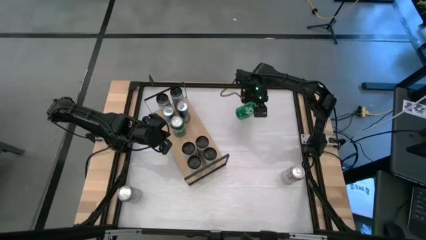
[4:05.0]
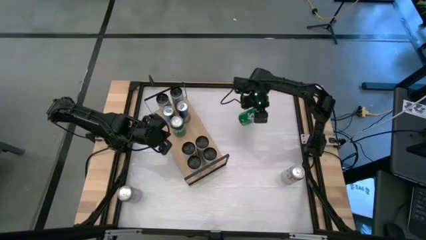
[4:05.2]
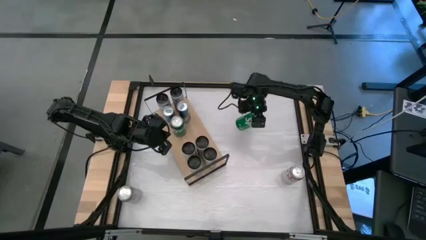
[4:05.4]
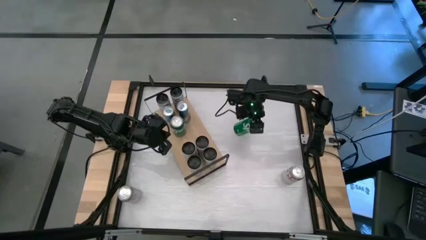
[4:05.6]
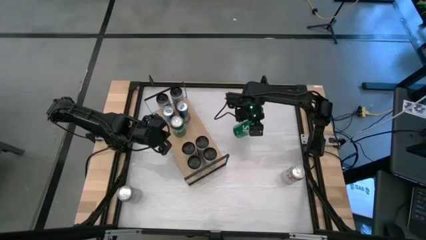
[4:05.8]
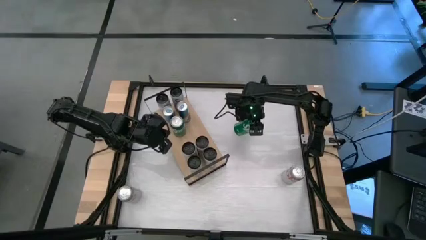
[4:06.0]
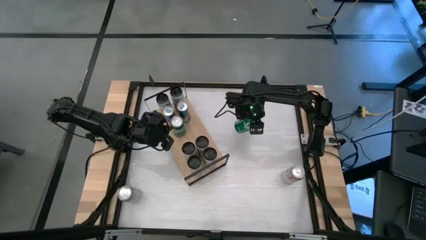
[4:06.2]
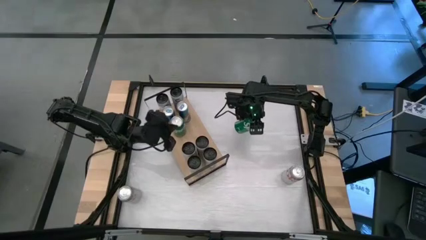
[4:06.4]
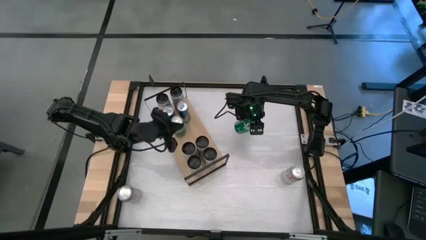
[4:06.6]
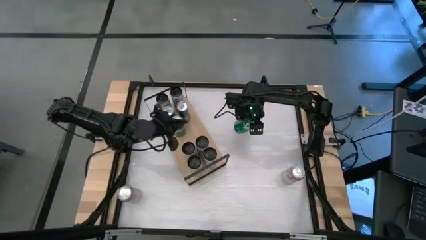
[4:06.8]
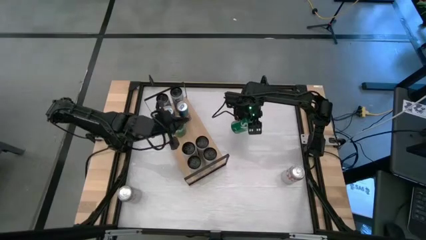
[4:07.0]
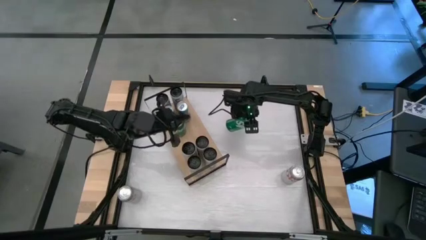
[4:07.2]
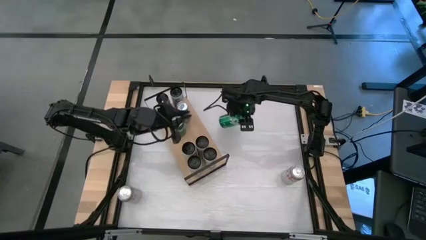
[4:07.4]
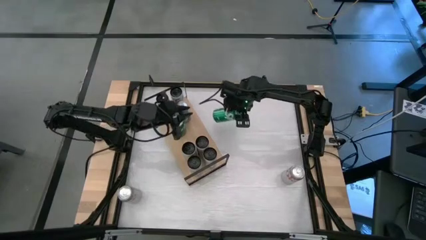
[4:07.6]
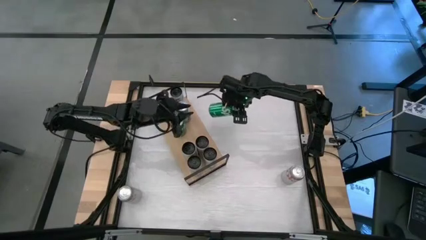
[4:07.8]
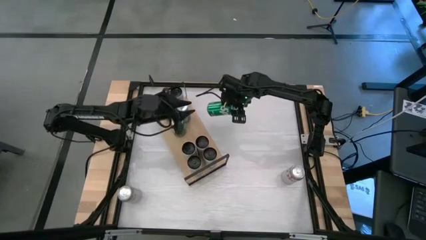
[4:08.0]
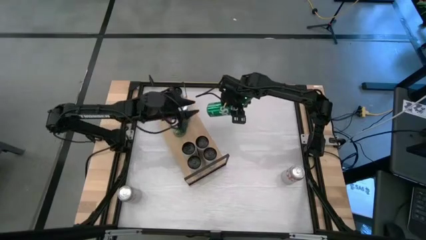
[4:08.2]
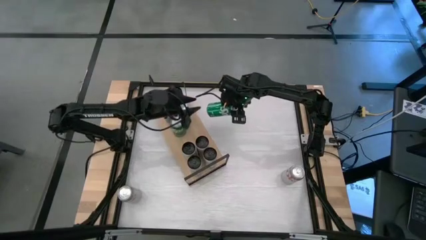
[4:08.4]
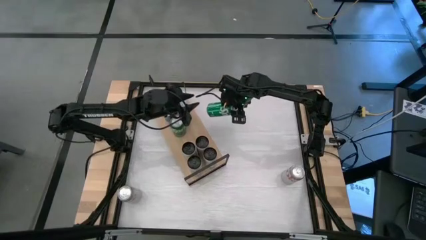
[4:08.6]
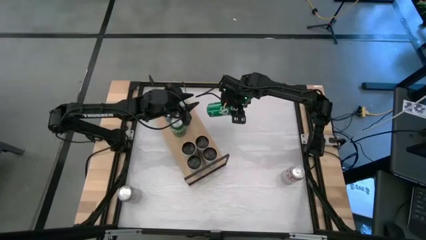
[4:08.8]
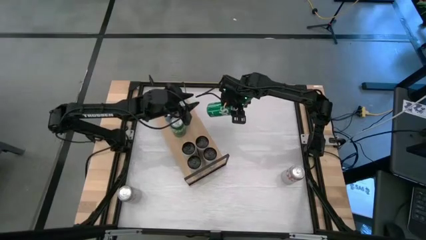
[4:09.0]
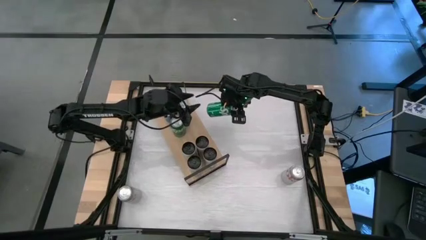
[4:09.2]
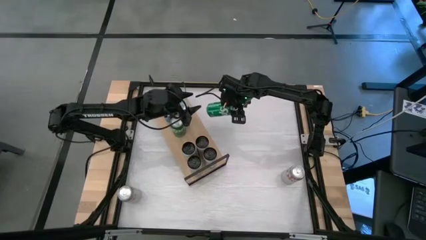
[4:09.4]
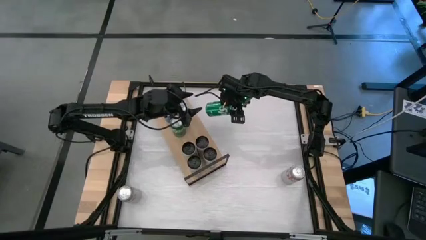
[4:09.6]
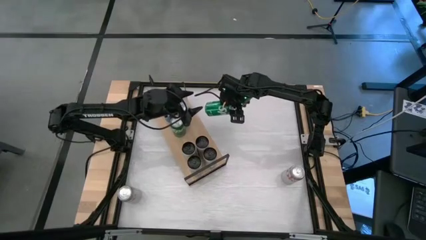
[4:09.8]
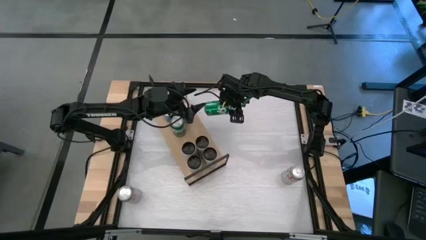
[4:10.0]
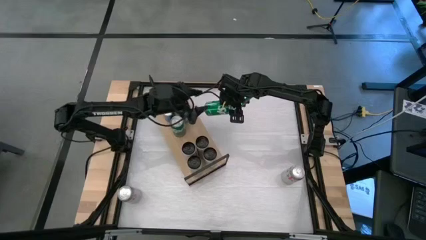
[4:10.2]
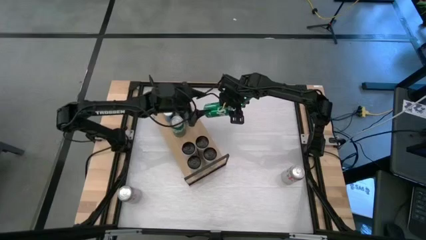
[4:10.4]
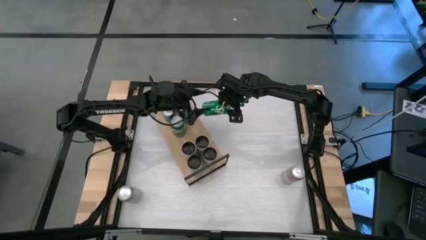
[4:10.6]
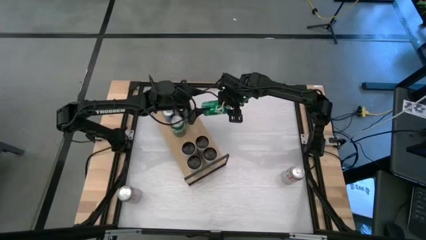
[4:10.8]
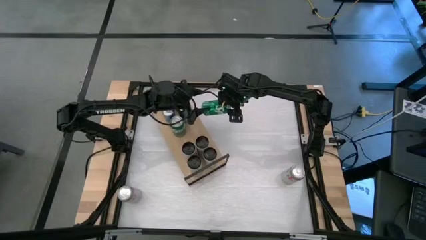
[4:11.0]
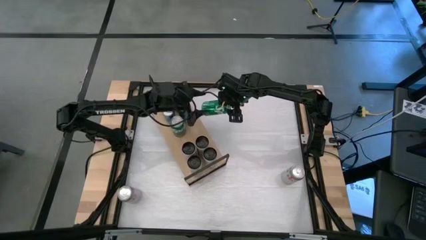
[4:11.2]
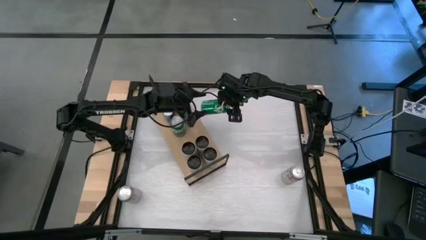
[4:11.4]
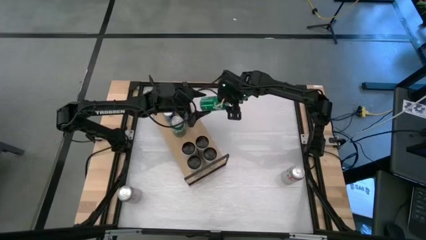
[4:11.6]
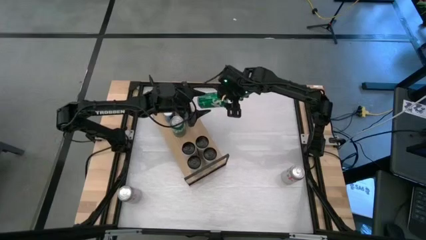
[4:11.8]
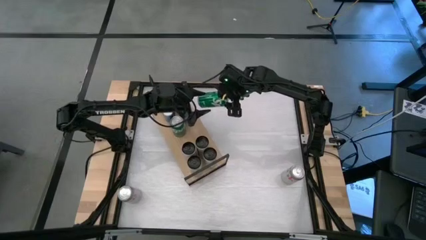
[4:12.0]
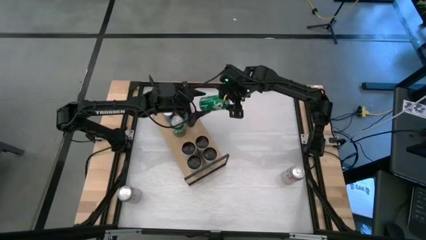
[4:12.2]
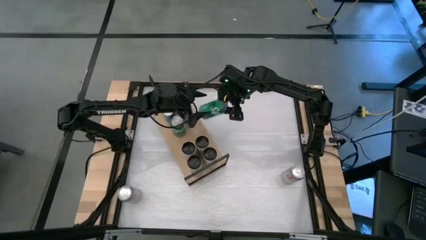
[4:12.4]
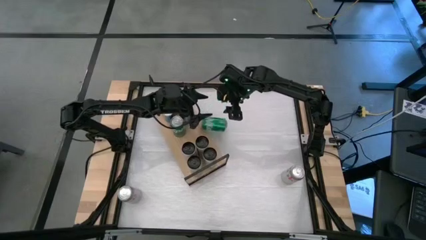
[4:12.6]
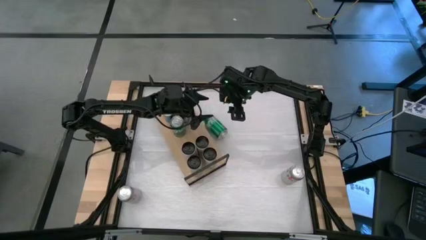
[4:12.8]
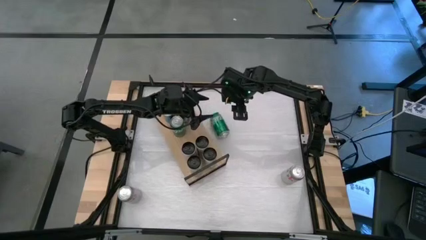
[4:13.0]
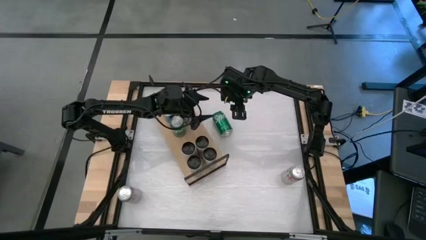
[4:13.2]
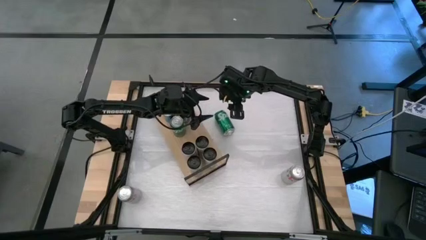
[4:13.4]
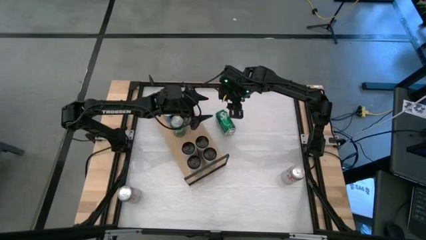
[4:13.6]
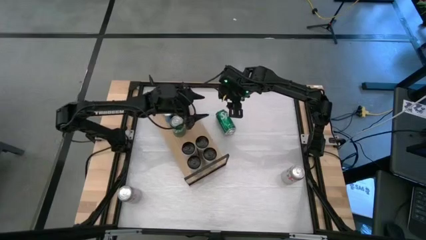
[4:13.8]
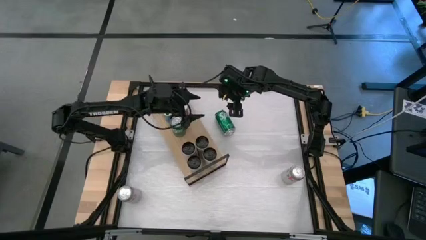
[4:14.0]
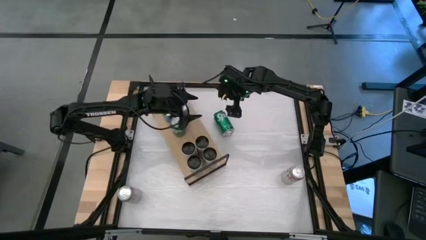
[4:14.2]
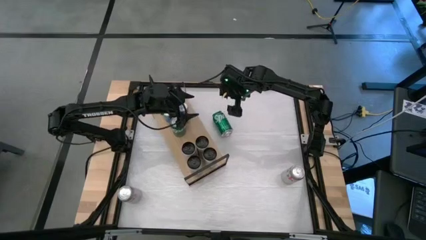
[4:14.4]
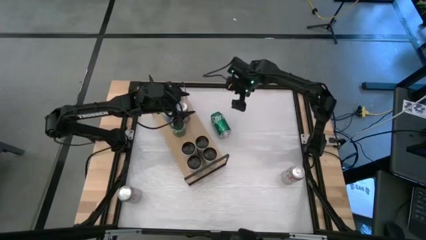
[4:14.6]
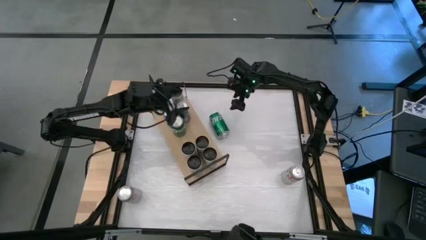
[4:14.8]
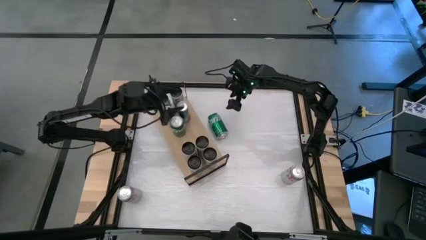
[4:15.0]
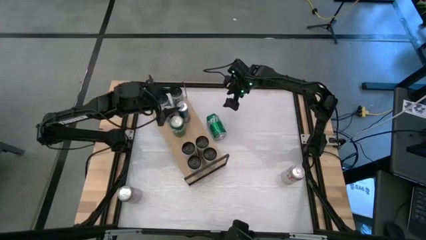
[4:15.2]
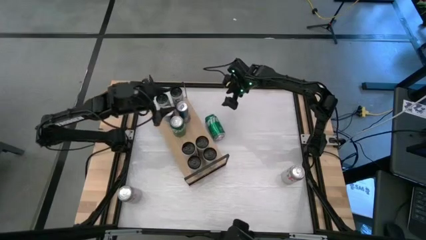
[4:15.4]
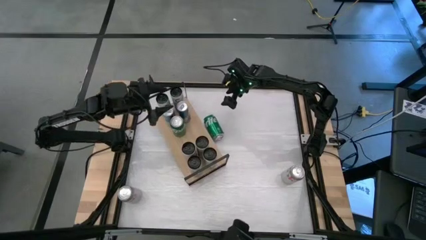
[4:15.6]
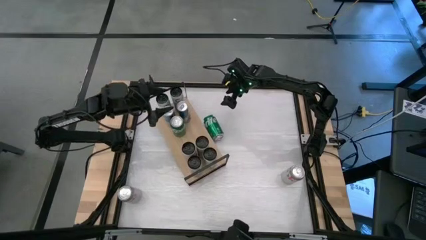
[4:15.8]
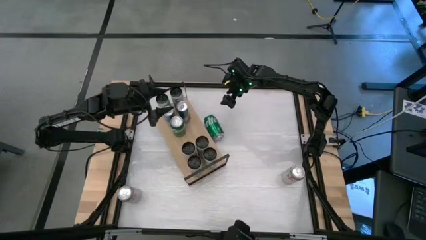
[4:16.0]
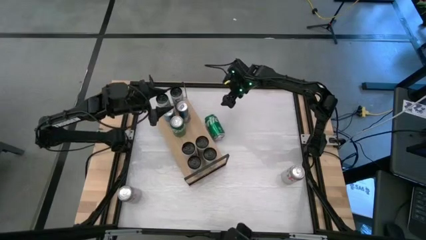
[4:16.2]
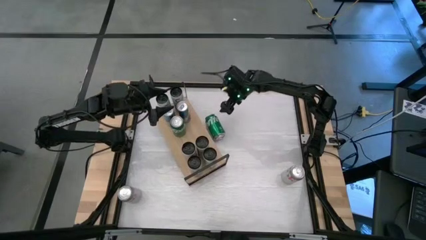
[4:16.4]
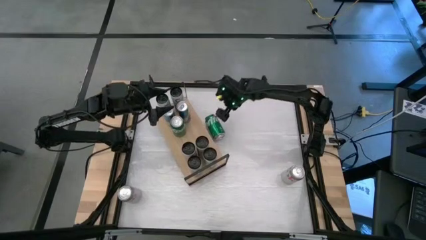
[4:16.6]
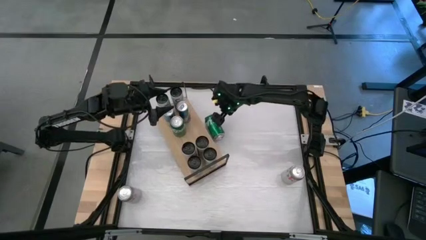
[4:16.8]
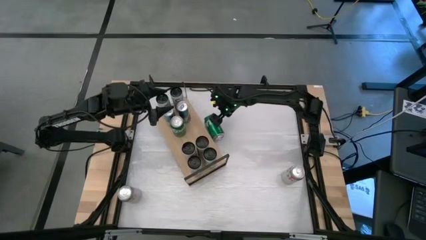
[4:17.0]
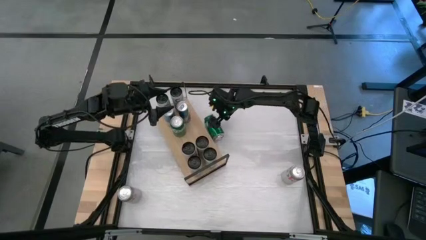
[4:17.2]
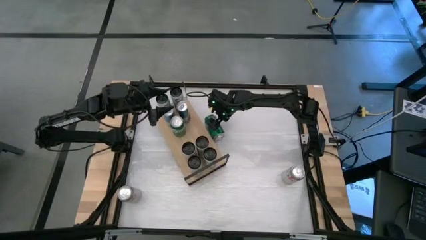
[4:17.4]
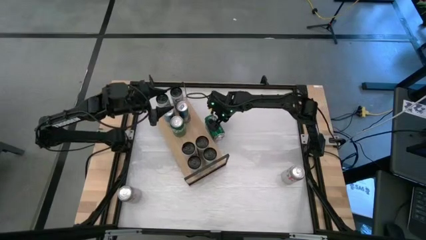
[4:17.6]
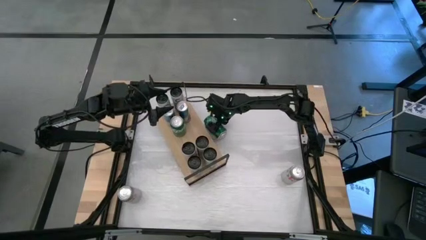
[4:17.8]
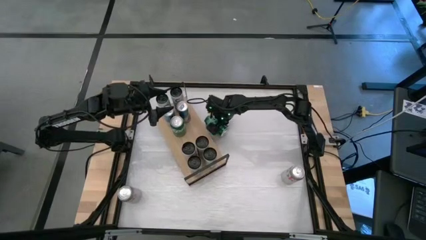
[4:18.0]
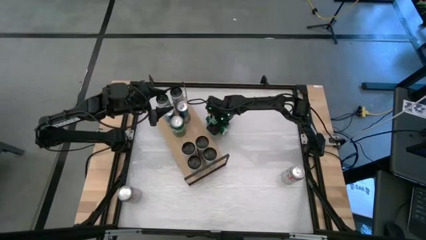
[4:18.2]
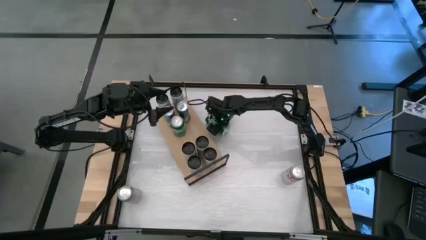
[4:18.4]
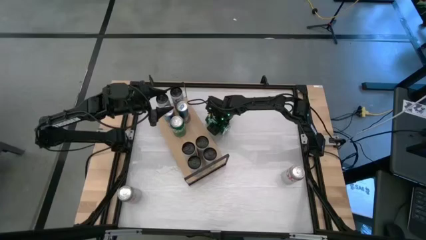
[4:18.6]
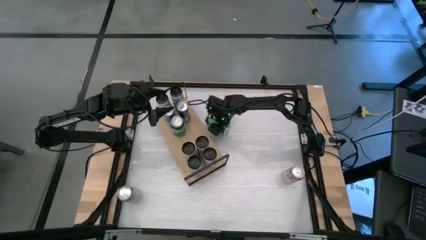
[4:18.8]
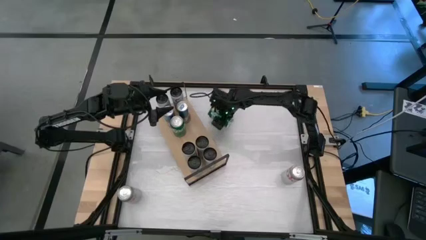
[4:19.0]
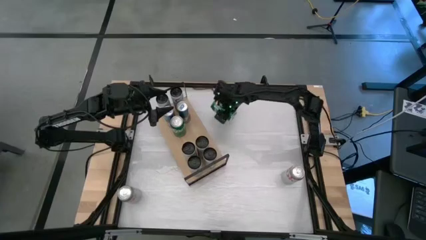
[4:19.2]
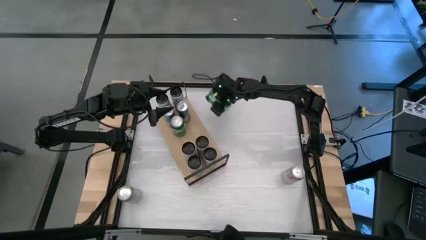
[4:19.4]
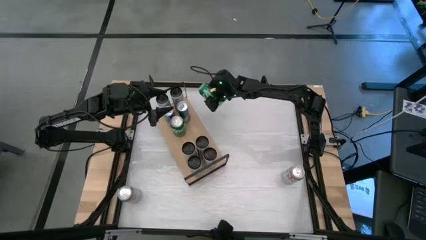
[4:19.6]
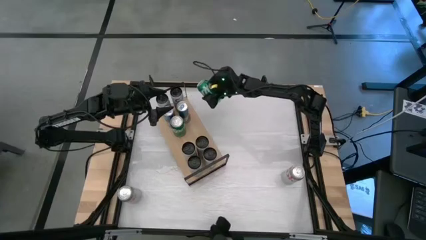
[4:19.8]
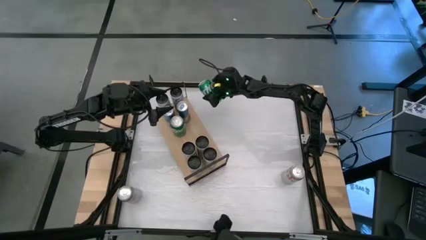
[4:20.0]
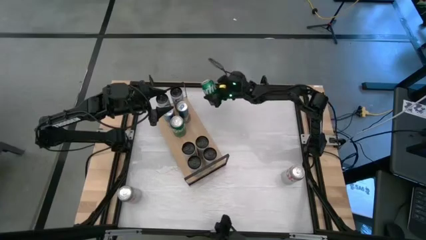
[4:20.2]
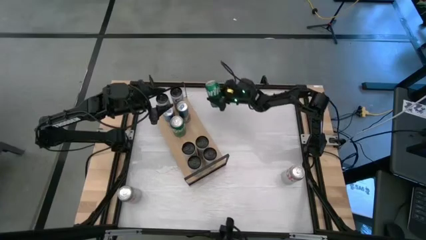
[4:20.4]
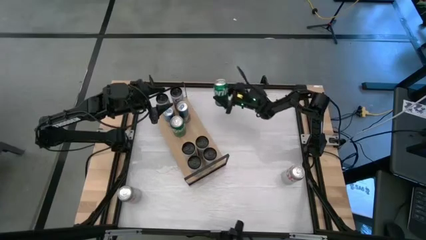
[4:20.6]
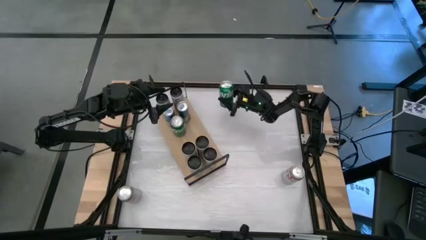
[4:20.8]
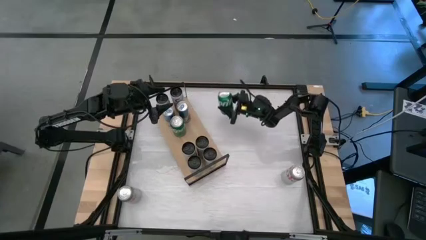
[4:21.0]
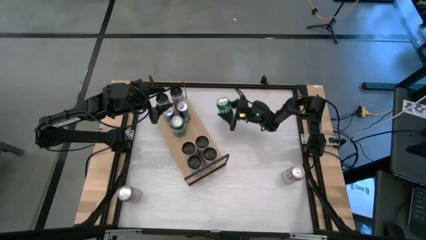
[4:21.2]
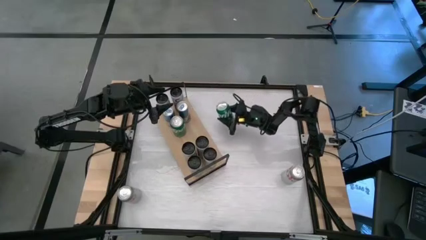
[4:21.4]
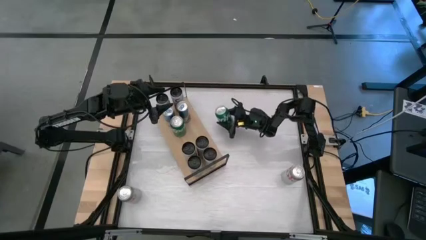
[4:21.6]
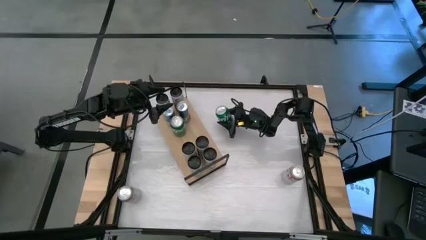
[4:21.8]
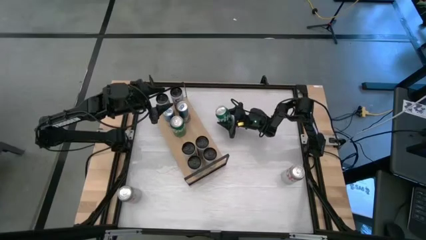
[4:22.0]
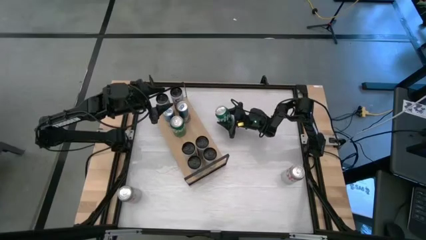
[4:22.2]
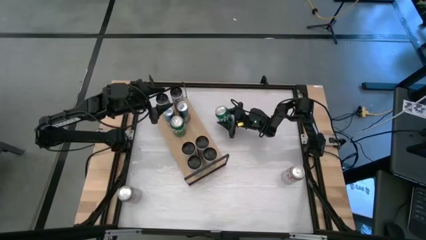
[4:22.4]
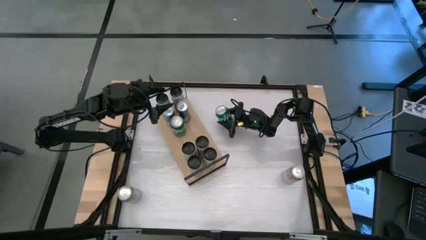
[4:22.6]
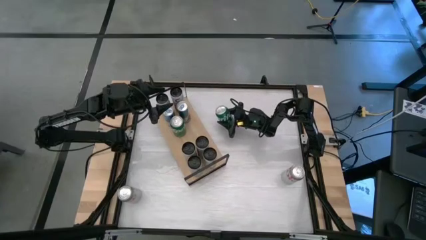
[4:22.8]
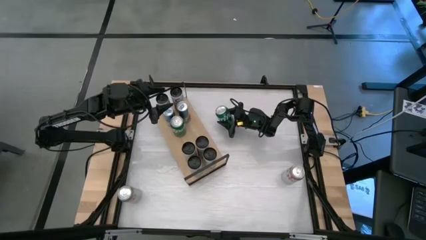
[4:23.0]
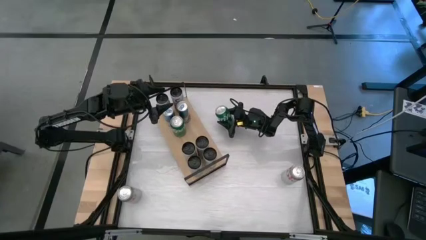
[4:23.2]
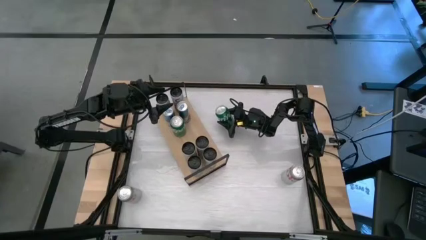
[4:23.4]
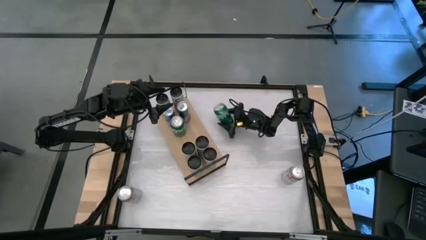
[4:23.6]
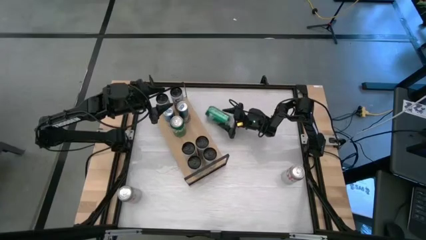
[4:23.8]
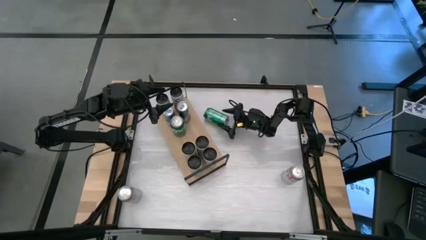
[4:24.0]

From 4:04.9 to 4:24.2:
Task: Place canned beverage on shelf
Put the green soda can on the shelf aligned with the other green soda can
